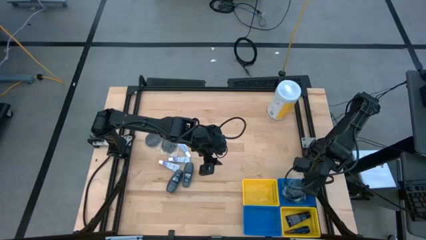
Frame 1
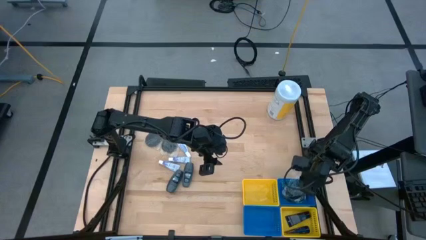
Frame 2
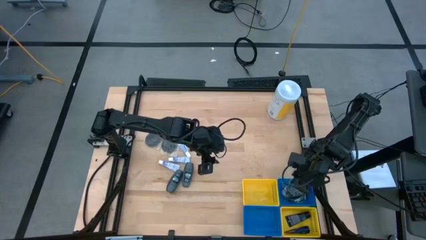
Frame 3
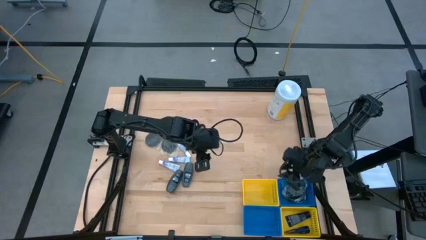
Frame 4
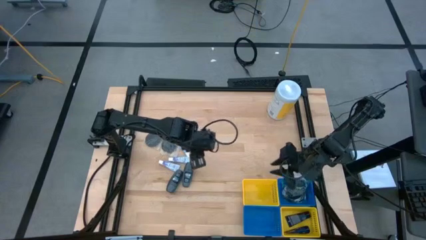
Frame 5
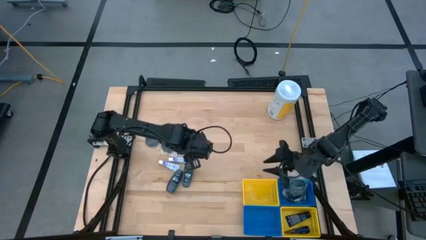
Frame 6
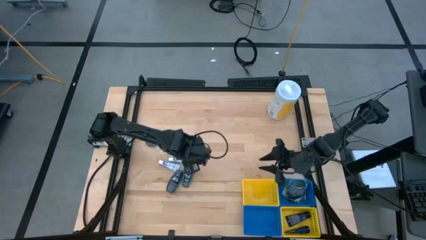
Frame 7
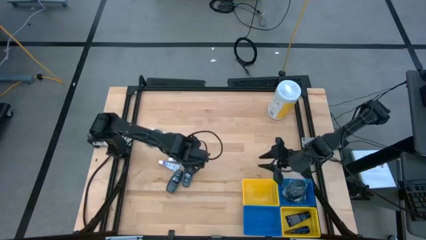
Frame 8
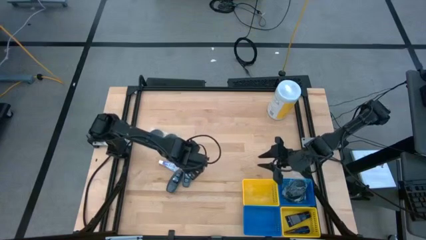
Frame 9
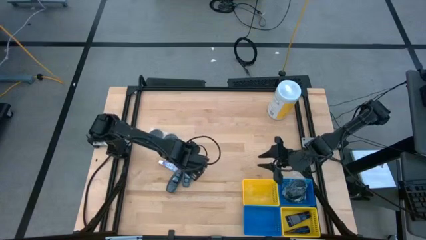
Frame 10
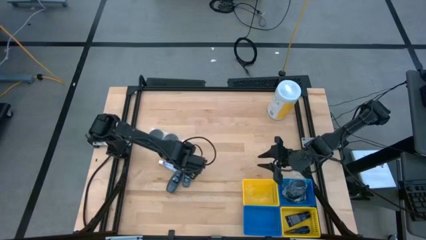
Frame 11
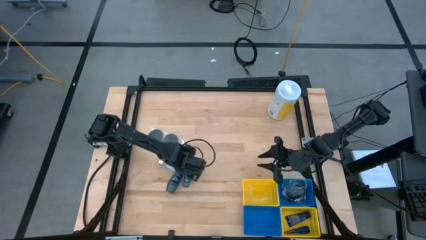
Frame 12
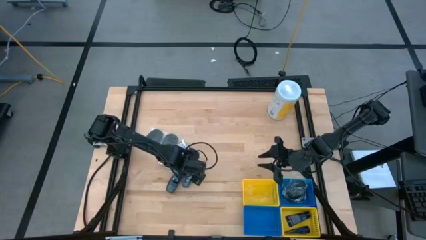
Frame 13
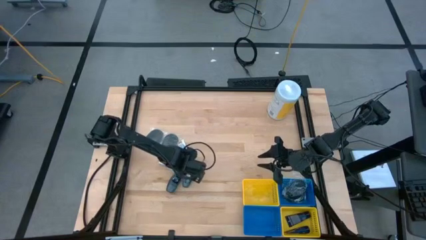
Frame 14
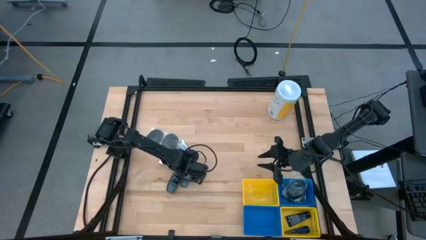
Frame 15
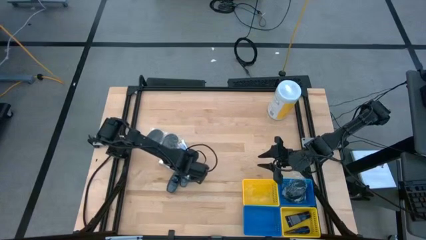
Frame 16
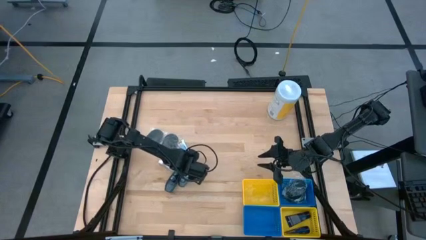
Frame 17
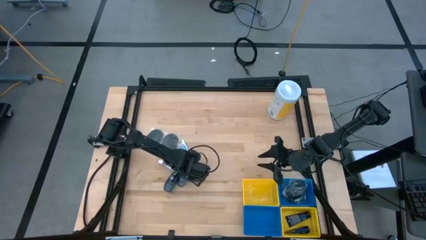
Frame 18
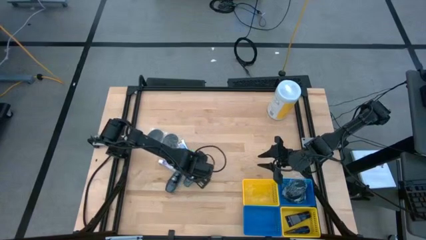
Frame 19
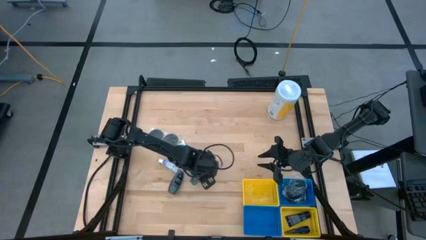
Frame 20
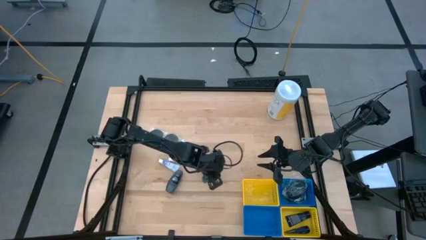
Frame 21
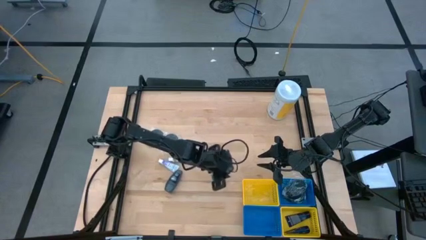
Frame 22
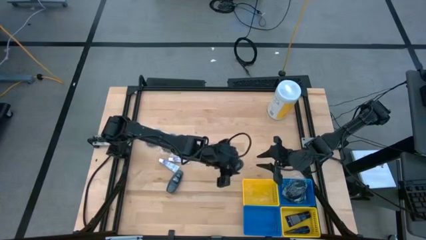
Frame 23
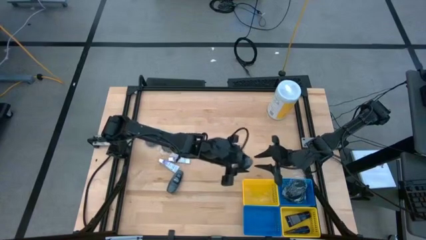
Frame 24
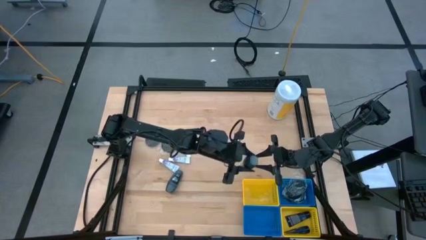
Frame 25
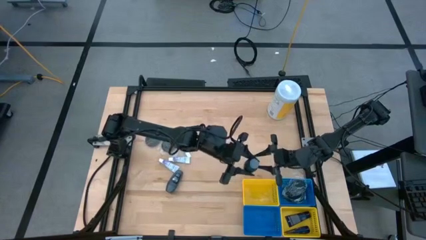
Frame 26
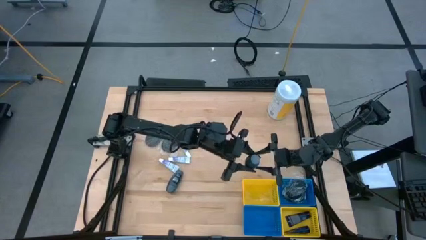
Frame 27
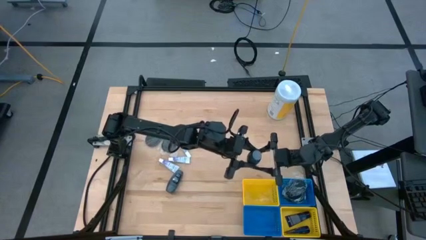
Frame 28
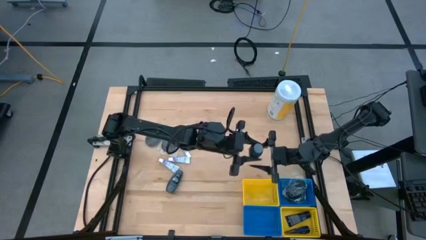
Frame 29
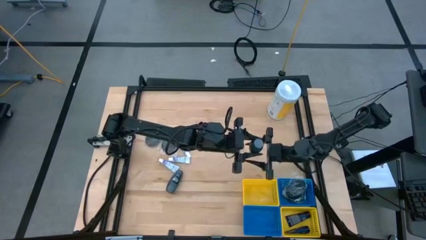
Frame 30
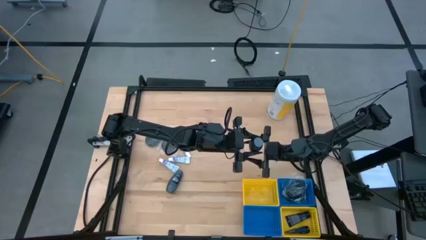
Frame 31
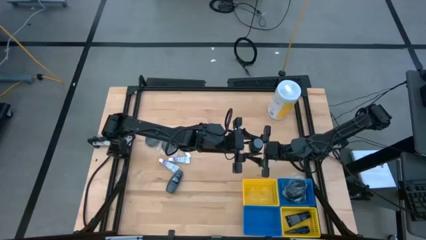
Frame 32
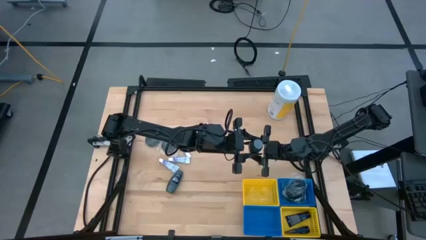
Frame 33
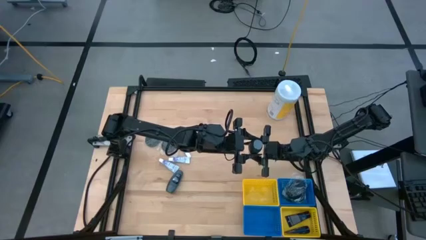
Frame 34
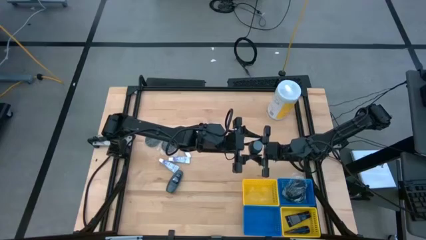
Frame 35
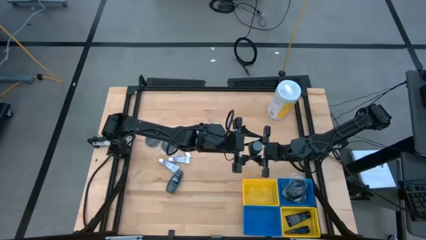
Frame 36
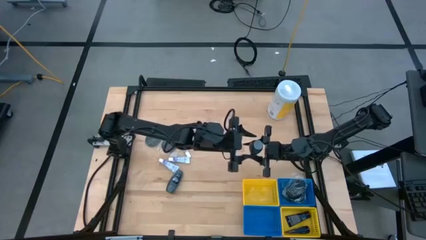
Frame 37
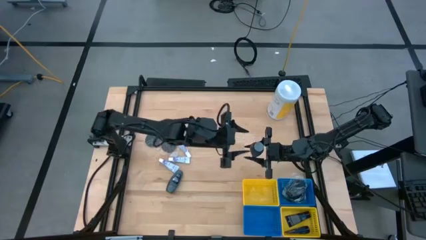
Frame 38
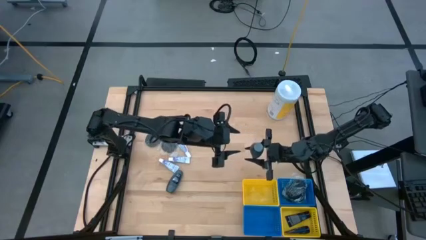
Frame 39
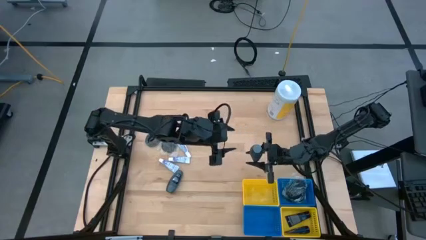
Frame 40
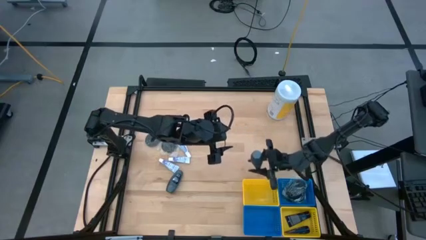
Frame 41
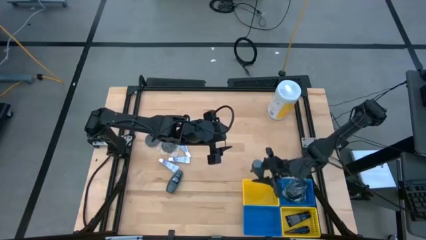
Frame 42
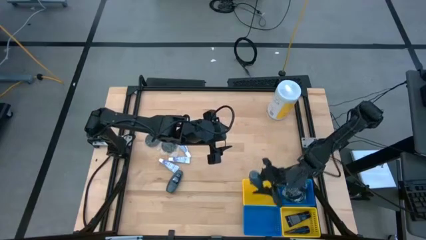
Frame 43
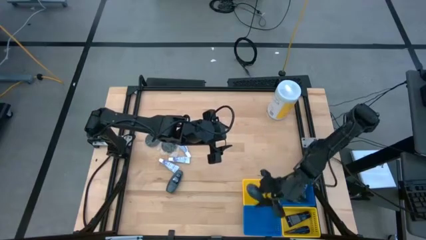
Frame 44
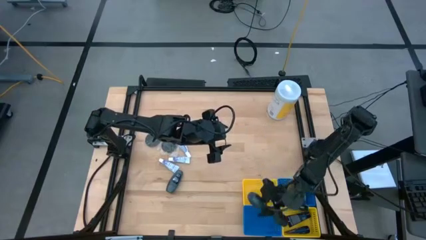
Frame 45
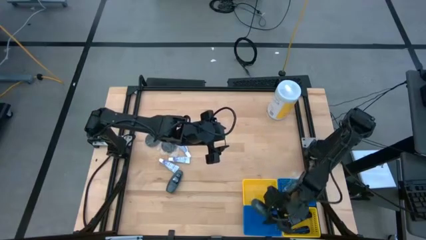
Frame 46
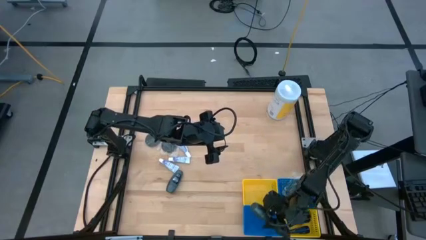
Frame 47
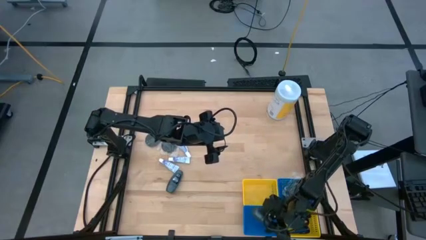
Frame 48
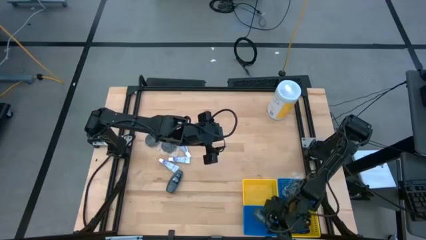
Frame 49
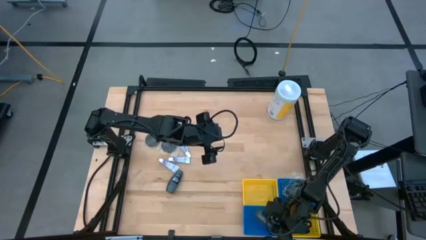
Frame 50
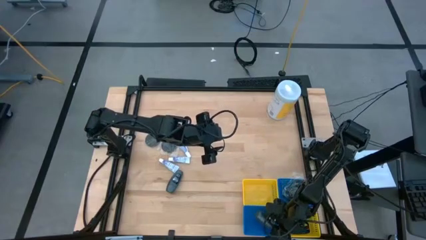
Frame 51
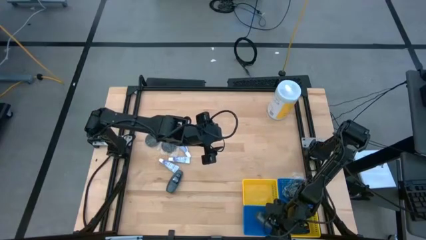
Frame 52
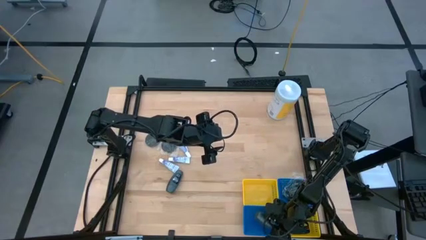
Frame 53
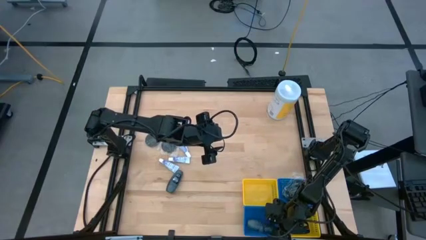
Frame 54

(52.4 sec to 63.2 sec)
Task: Pick & Place Travel size toiletries
Put the black deodorant into the bottom blue bin

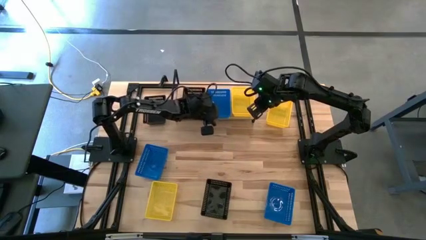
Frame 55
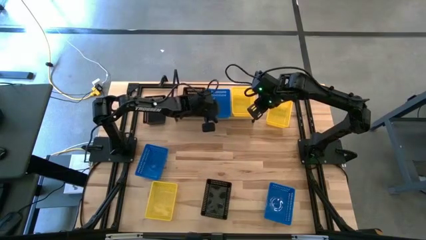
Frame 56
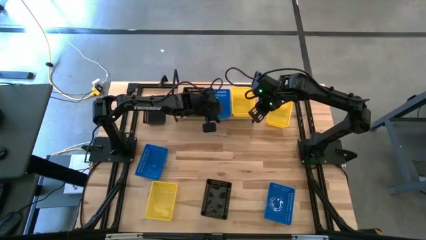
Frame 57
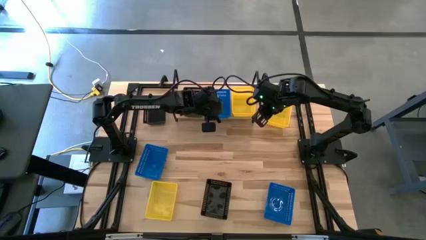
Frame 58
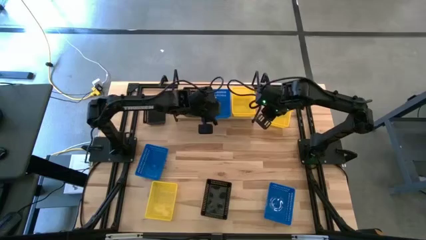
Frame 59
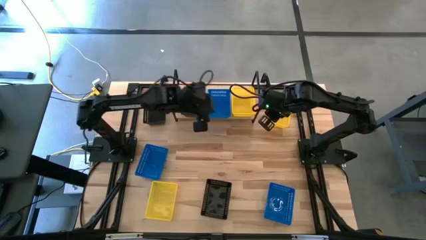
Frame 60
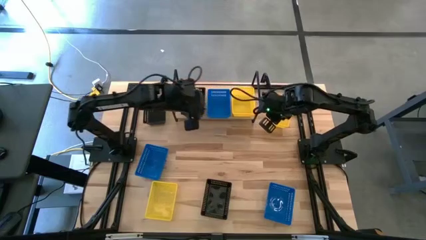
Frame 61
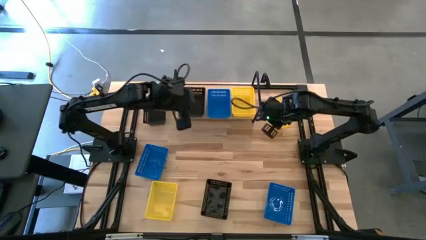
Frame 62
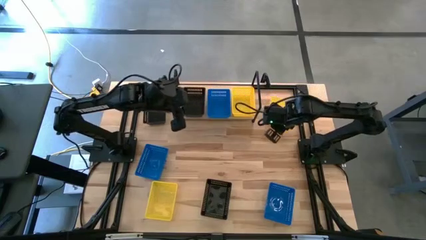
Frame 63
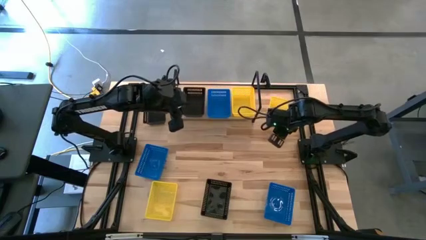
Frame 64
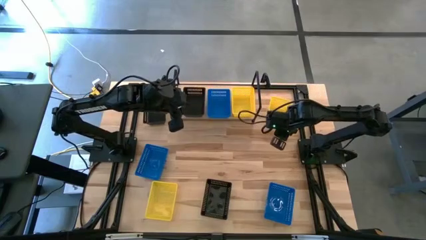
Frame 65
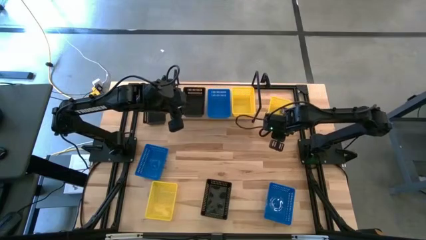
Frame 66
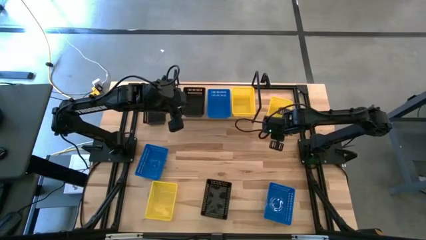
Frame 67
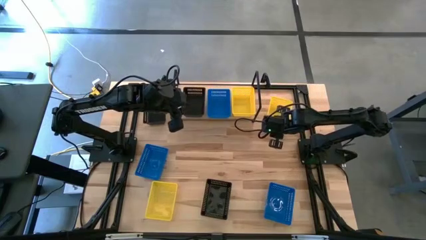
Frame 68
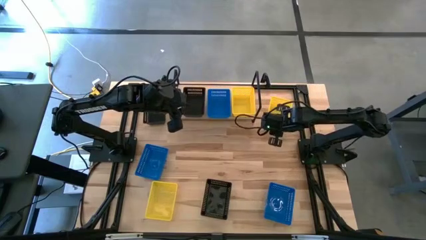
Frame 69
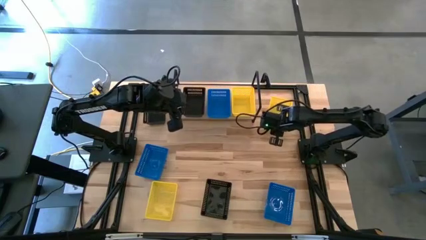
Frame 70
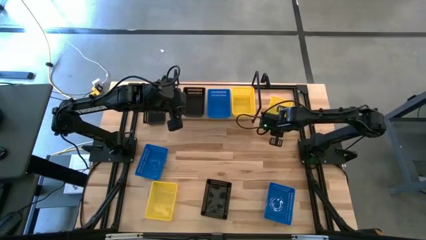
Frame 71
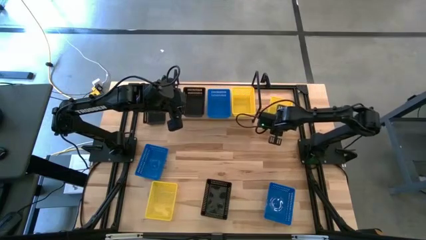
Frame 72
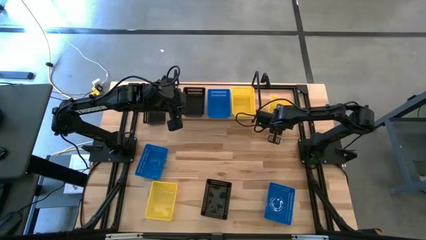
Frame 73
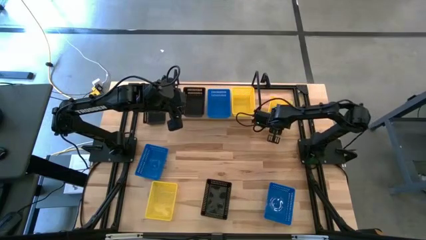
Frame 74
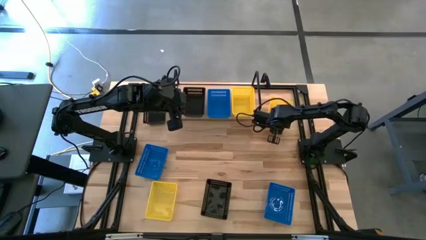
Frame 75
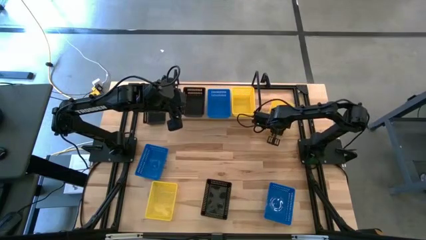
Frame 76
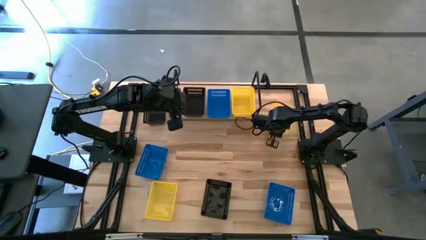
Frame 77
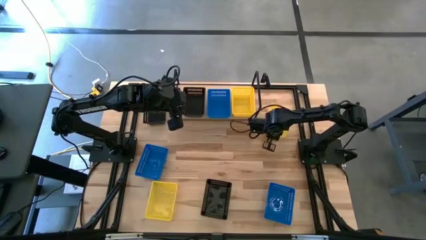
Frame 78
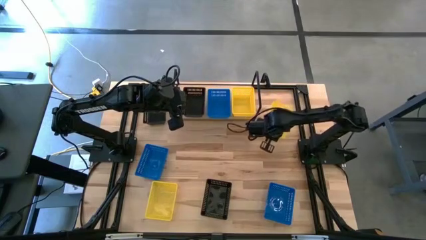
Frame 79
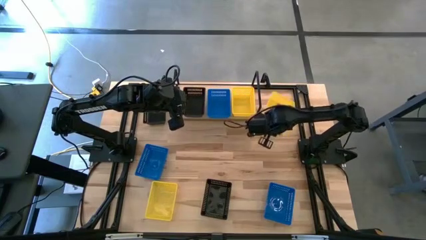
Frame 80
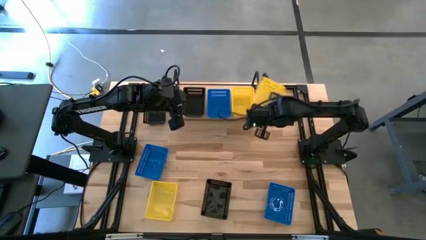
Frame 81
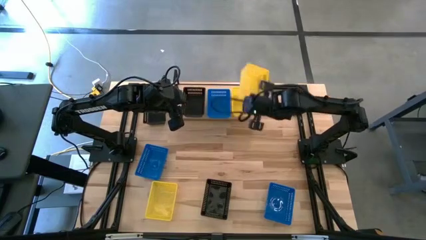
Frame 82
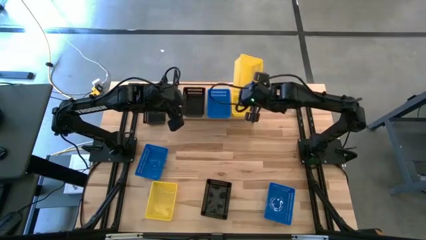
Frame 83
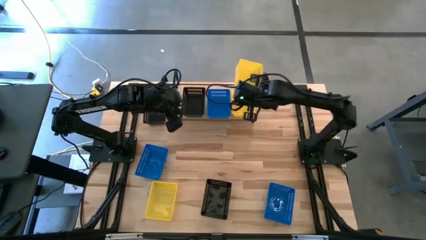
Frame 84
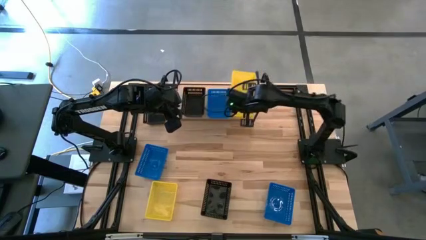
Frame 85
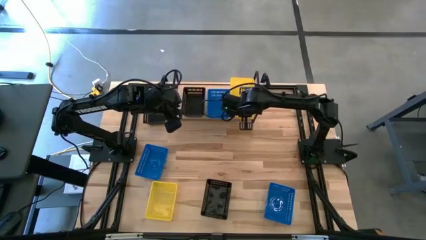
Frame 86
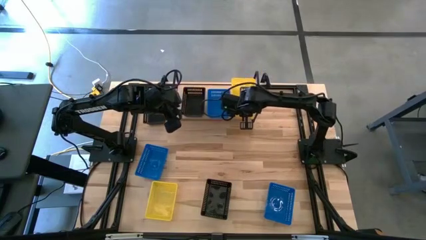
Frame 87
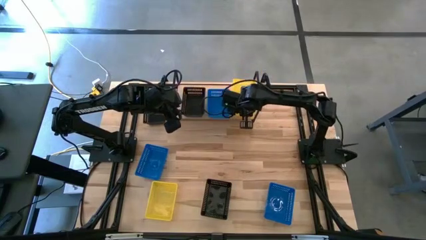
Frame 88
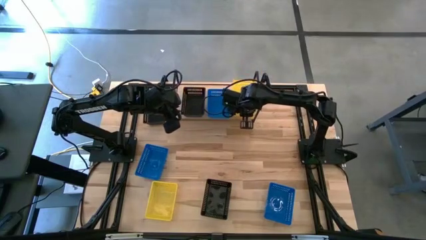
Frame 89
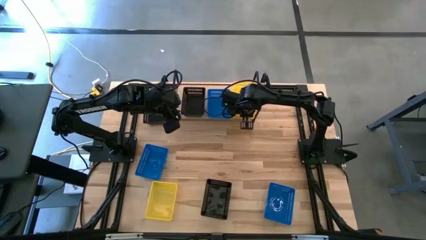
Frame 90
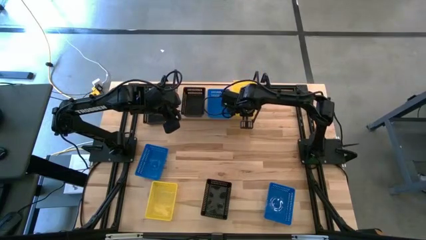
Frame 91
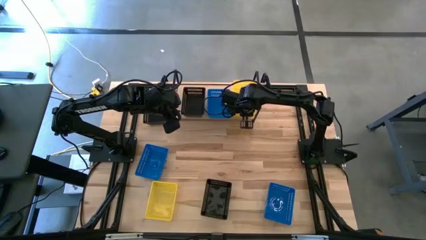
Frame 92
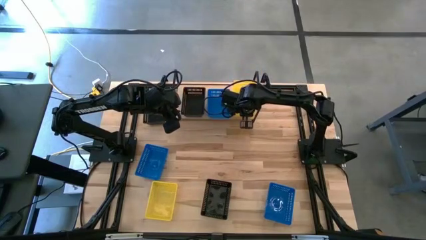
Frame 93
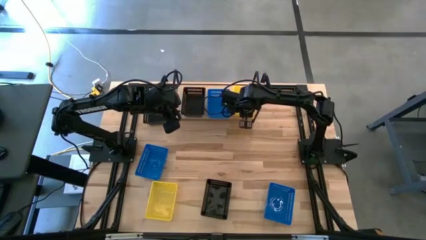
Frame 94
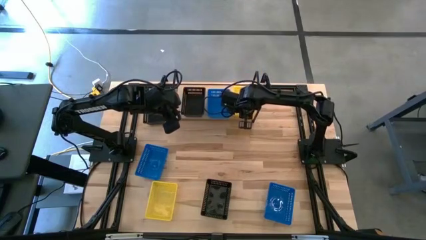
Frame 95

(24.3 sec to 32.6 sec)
Task: Stack baskets on shelf by color
Stack the top yellow bin on top of the yellow bin on the shelf
